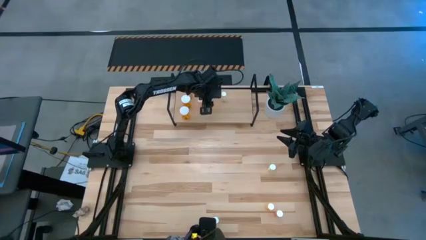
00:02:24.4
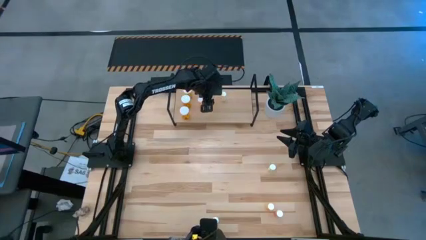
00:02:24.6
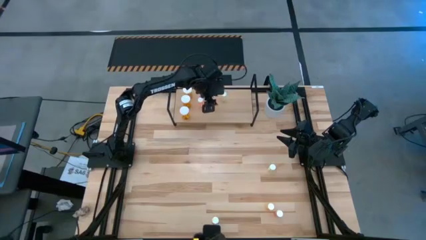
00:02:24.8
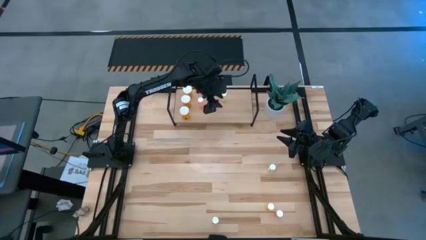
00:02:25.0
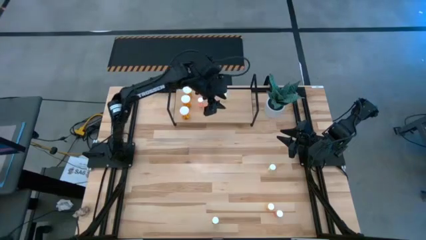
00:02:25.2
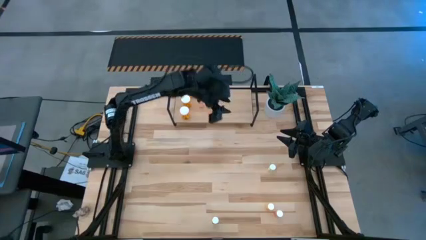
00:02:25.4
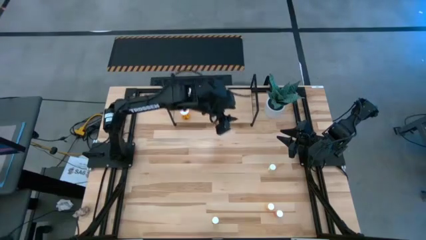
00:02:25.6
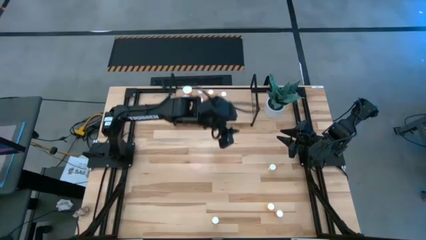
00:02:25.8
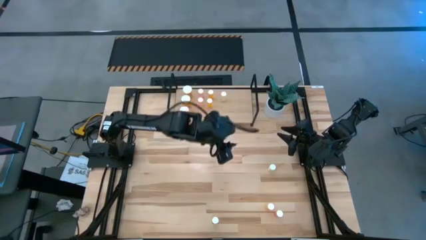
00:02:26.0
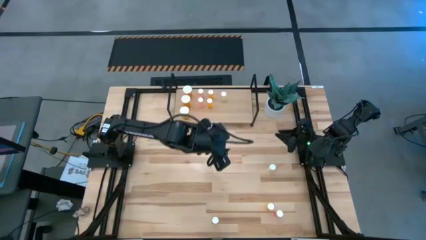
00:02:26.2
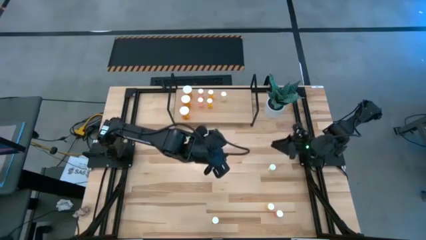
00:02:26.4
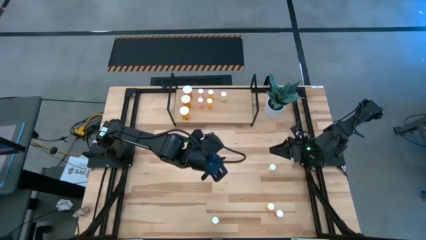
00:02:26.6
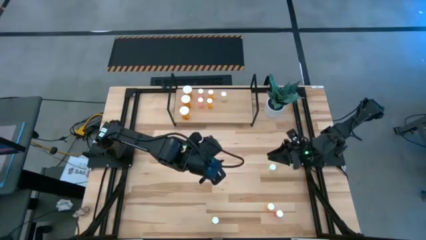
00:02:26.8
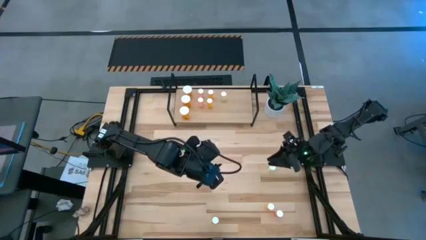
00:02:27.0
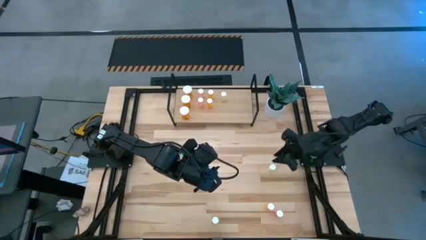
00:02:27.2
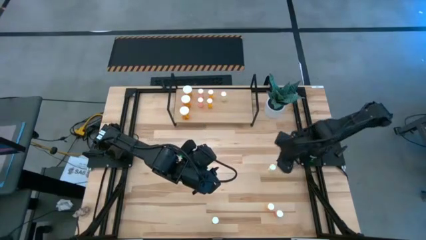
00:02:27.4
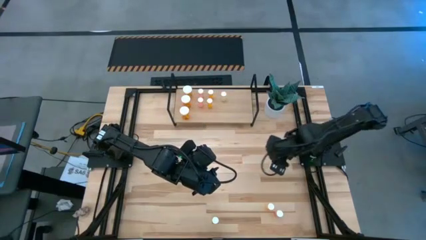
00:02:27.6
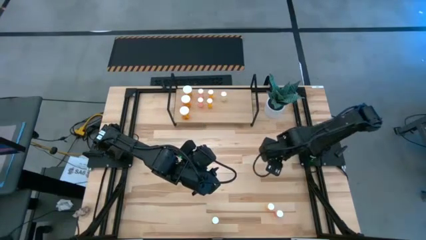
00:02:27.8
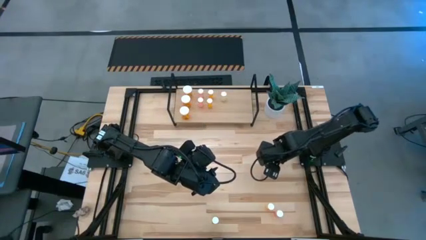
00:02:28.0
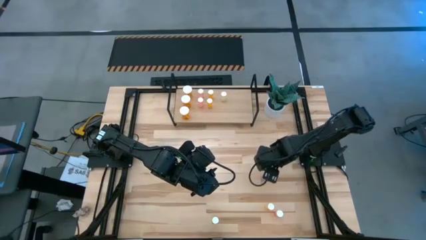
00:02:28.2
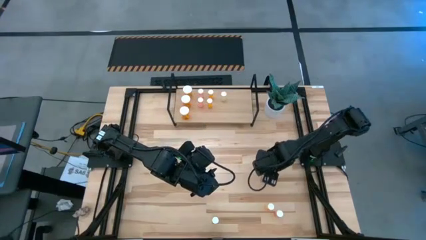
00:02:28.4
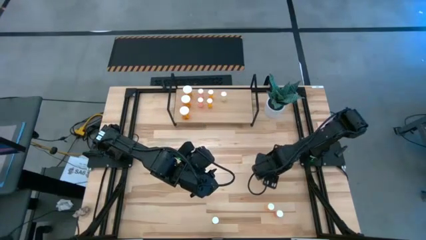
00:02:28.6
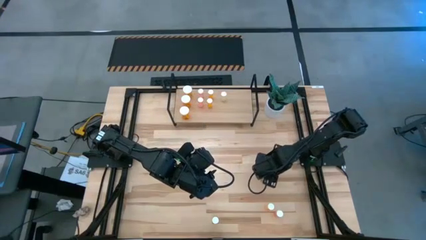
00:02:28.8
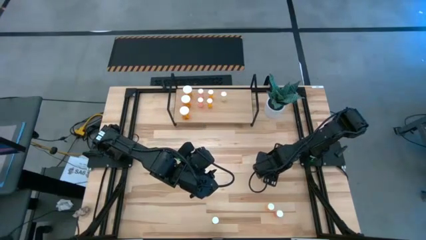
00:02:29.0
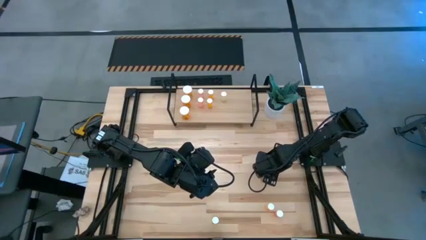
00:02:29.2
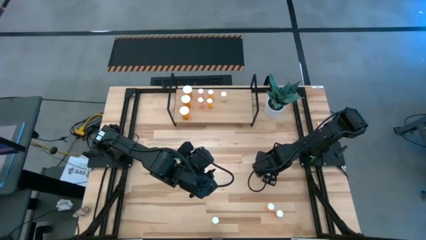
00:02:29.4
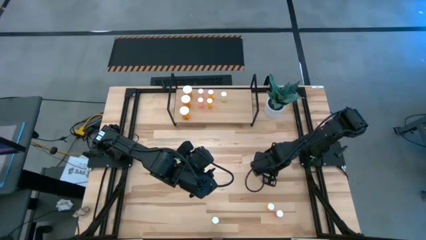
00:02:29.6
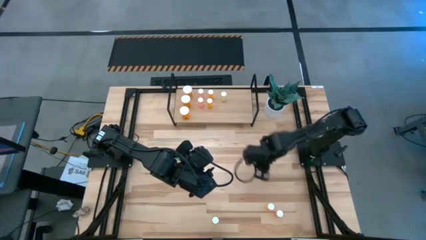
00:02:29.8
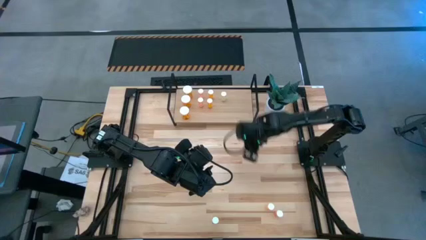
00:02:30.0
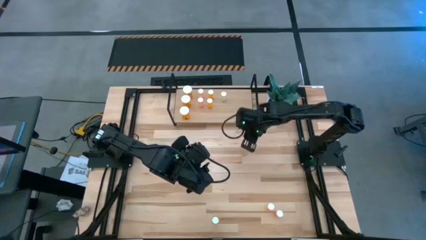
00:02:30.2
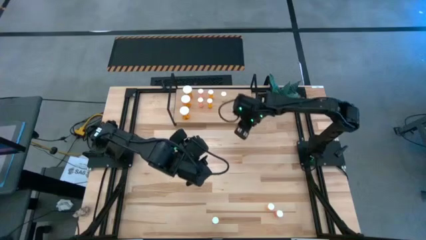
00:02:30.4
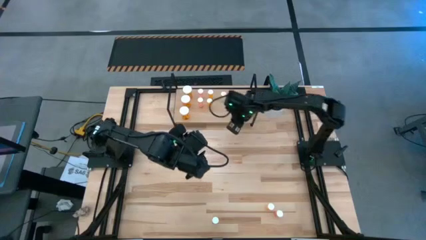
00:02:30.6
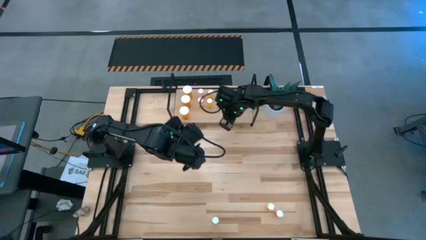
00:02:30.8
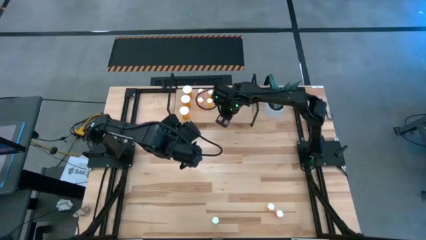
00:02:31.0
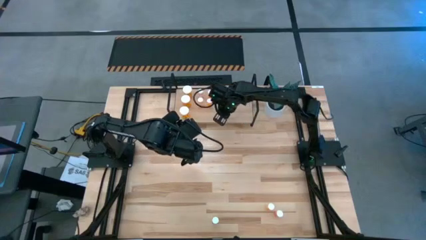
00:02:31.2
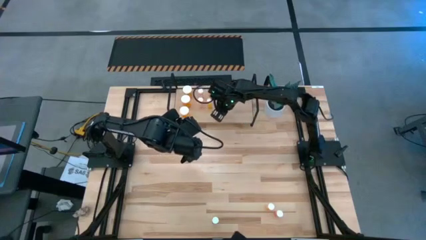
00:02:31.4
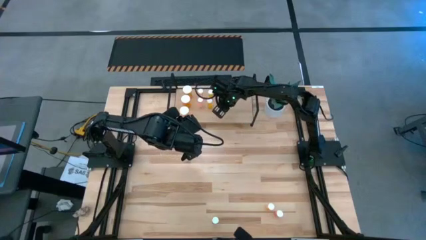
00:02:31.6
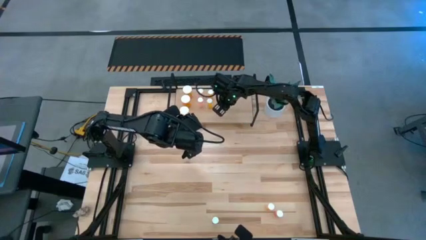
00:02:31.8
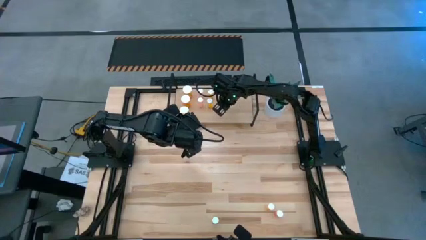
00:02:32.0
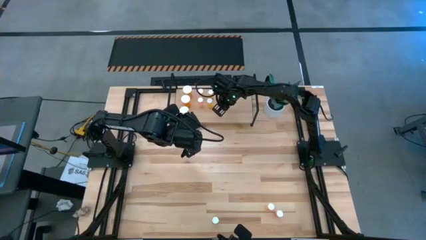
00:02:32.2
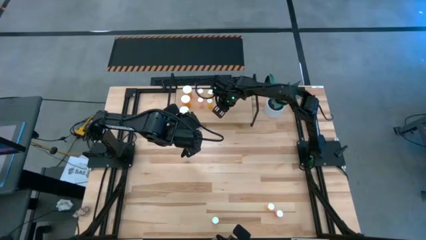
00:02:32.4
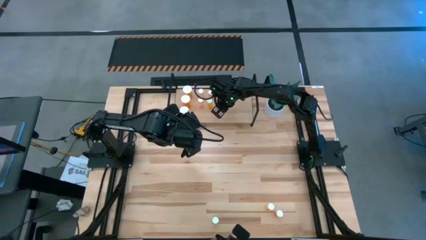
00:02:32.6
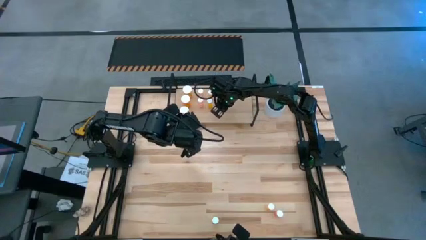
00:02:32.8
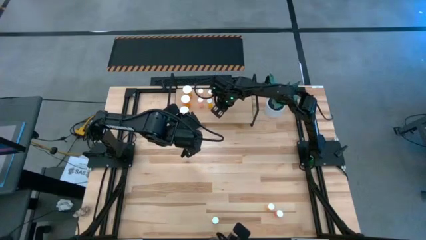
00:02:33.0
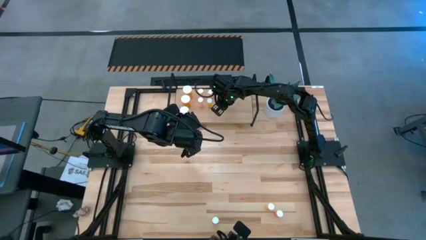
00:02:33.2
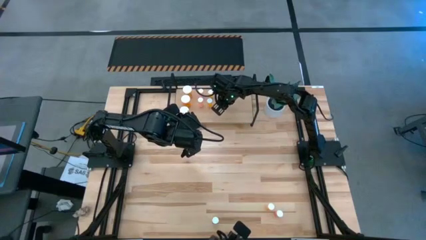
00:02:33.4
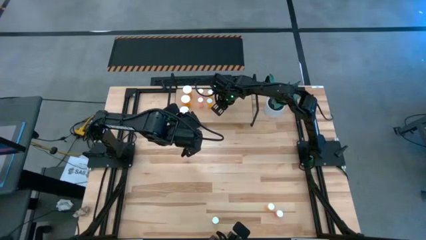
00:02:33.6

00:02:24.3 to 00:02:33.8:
Task: Pick and place medicine bottles onto shelf by color
Put the top yellow pill bottle aligned on the shelf with the other yellow pill bottle

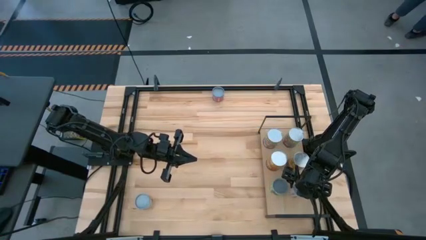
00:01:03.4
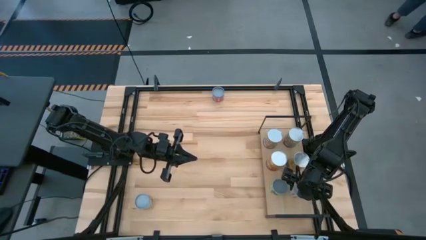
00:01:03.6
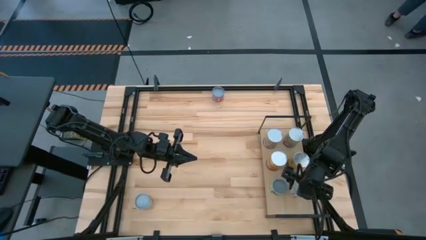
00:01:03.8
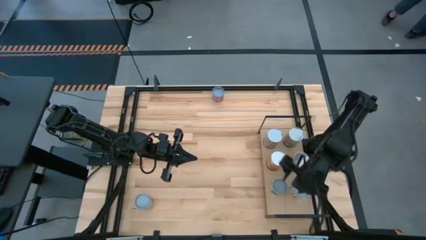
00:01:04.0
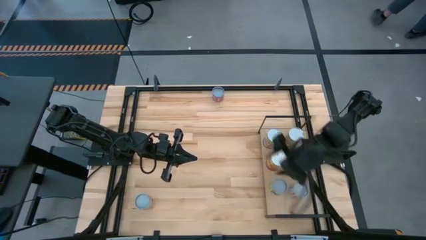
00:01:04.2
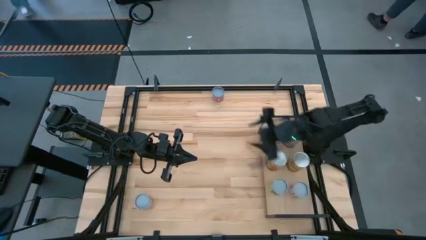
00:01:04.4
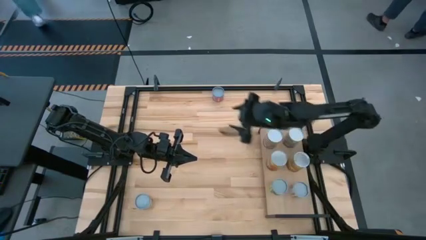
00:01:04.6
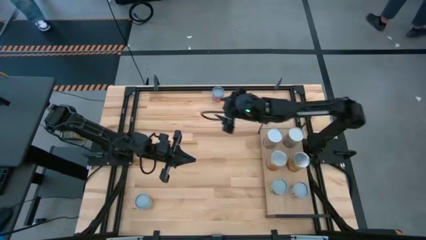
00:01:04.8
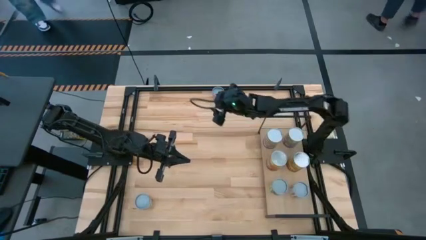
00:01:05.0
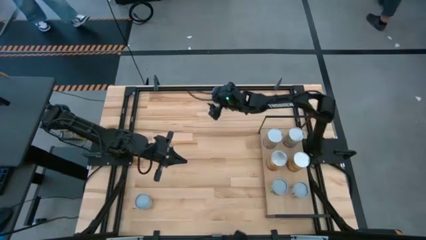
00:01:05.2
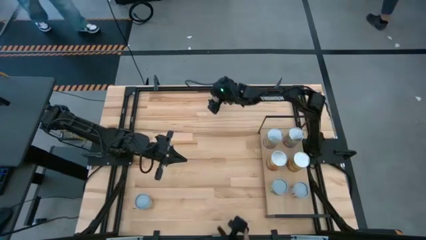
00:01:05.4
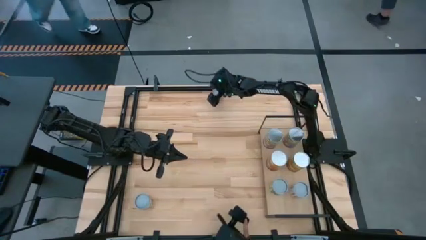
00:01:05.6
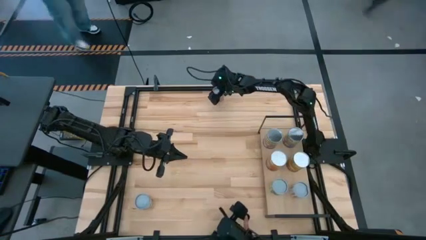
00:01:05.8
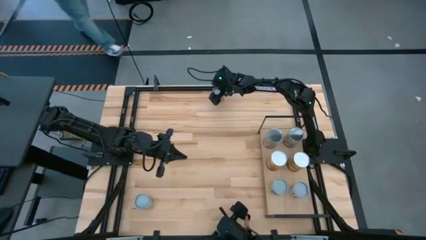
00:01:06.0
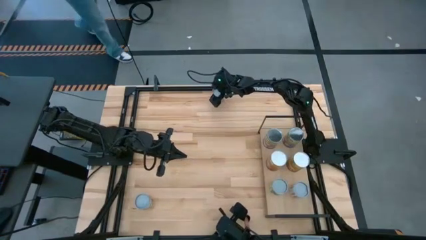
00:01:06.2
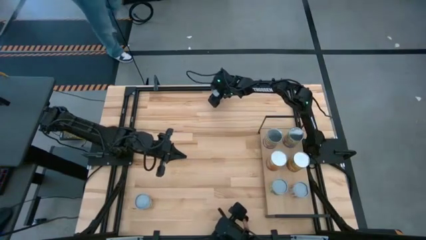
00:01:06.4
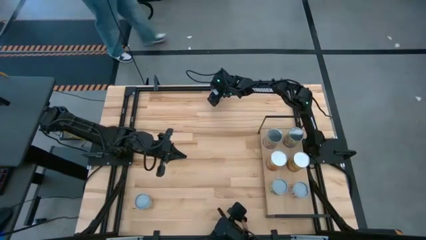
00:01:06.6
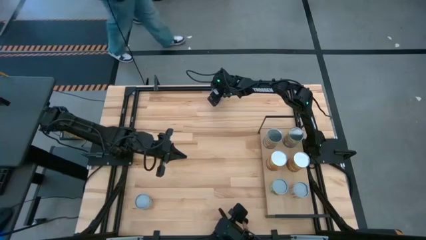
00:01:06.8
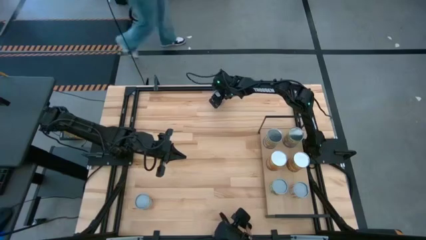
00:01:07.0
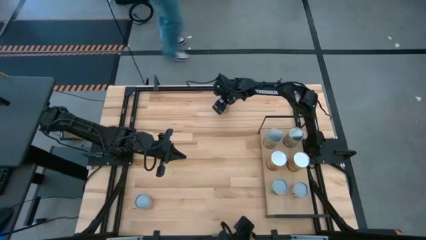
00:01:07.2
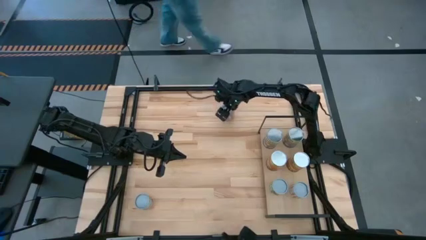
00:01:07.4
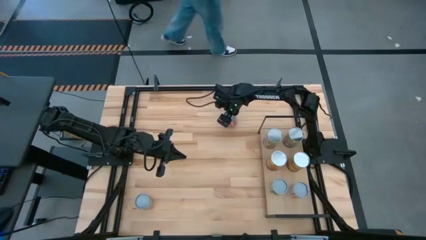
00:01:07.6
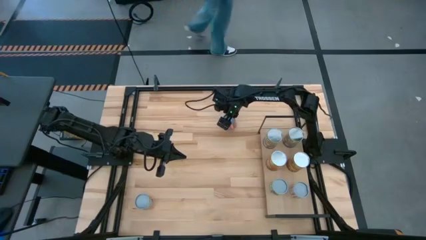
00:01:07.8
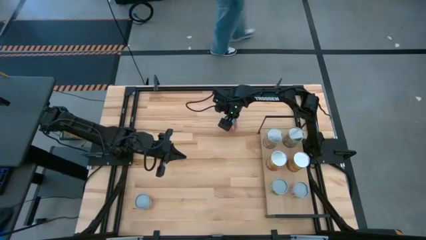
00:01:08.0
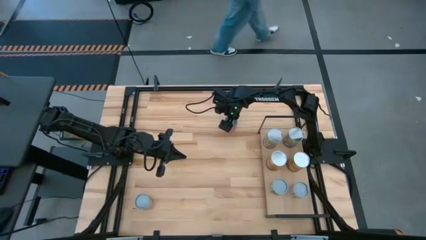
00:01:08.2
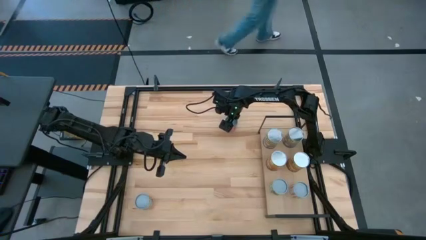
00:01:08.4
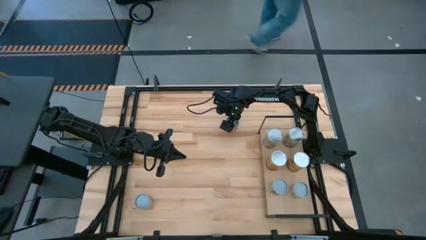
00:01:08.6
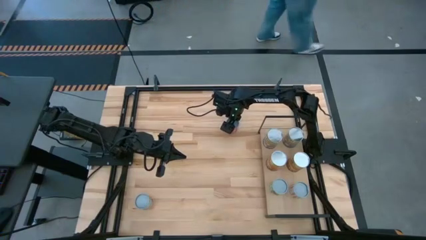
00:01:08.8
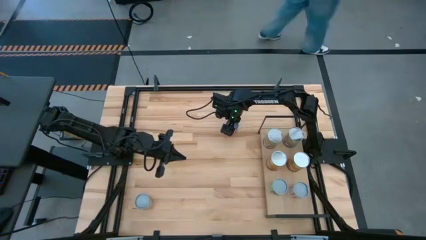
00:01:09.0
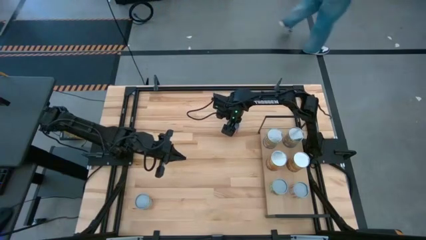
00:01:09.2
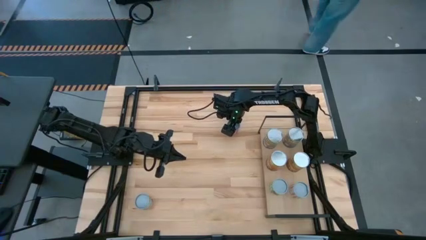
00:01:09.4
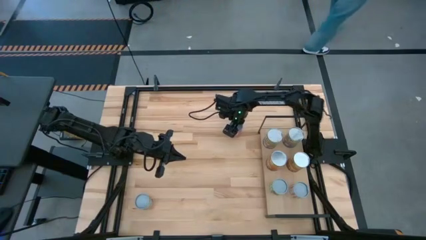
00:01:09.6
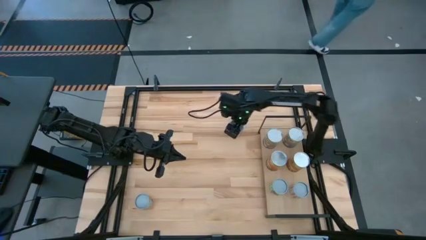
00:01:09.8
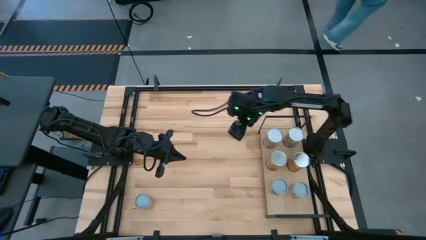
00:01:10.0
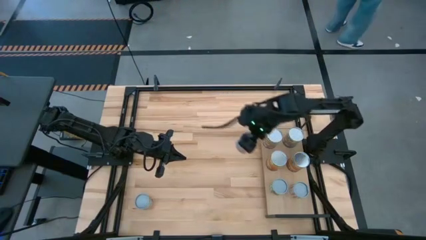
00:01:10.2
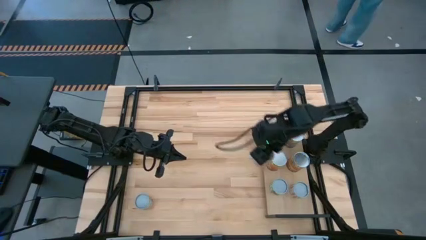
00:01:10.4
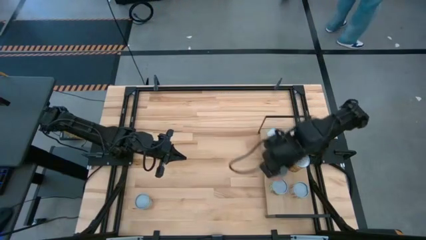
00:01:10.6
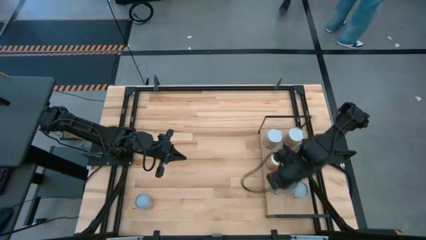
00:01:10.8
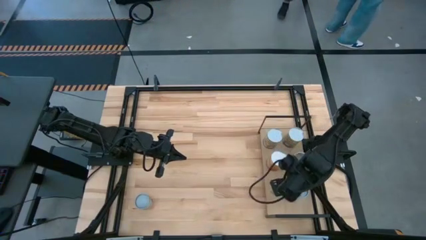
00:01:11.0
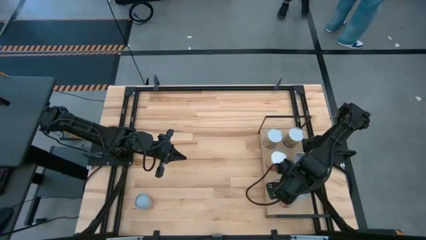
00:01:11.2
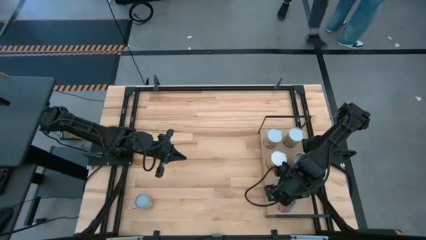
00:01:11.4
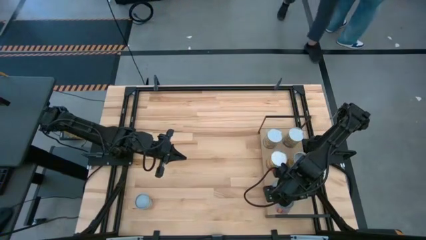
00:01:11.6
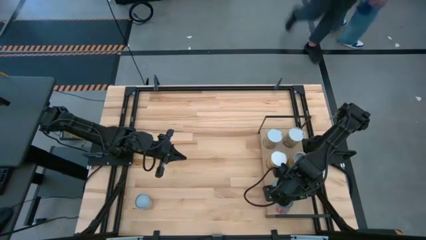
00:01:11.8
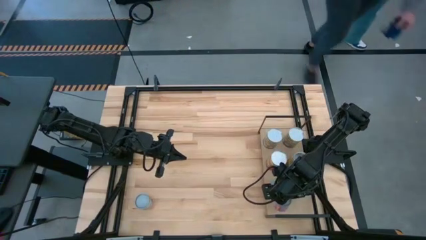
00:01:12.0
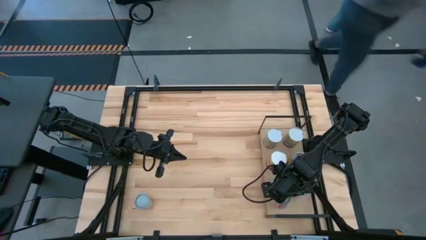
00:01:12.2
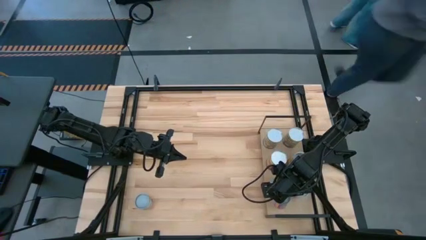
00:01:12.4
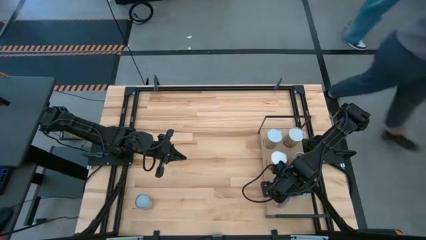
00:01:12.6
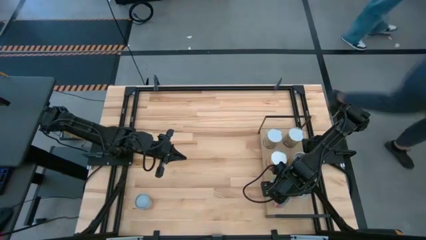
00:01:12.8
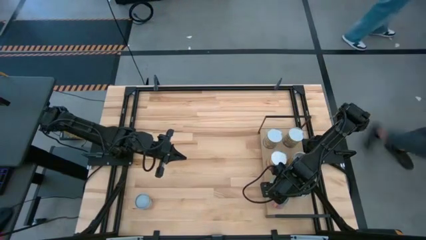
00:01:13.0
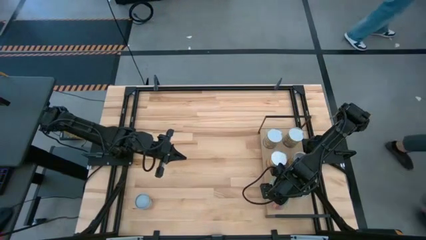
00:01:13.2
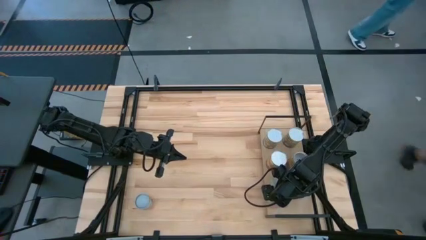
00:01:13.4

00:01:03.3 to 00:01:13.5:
Task: Pick and place cans onto a shelf
Put the small canned corn on the shelf
